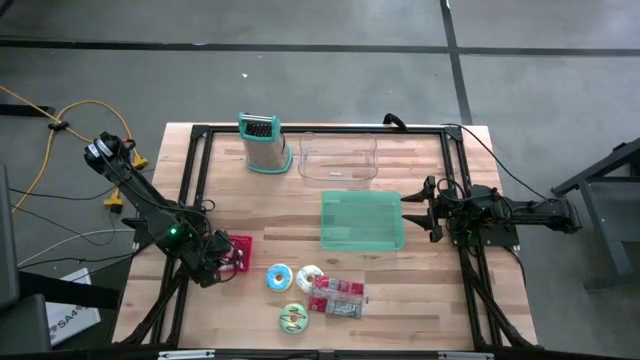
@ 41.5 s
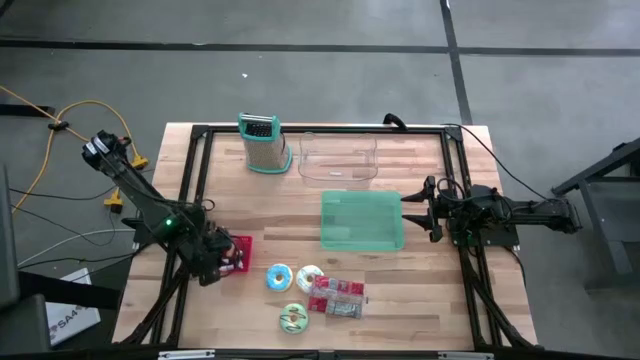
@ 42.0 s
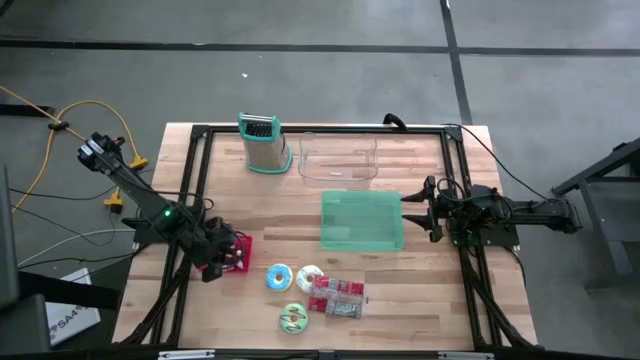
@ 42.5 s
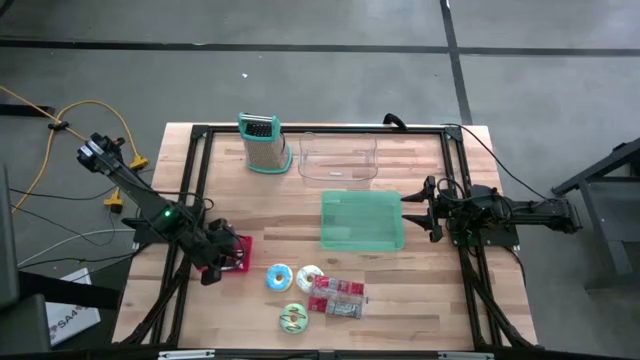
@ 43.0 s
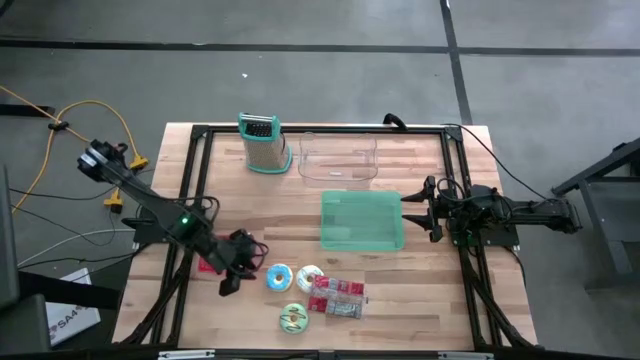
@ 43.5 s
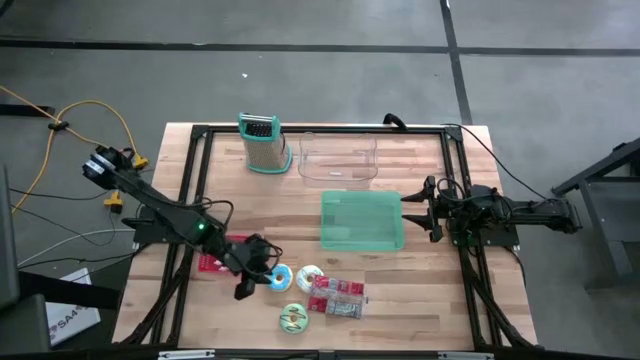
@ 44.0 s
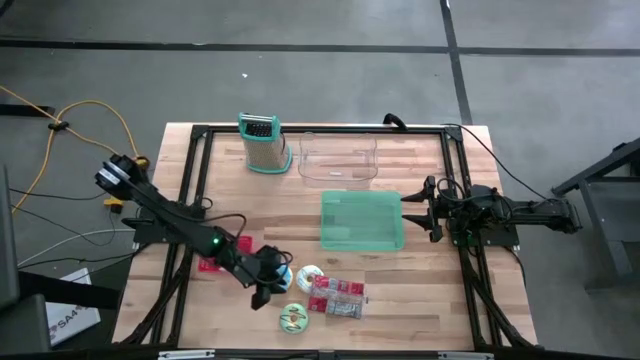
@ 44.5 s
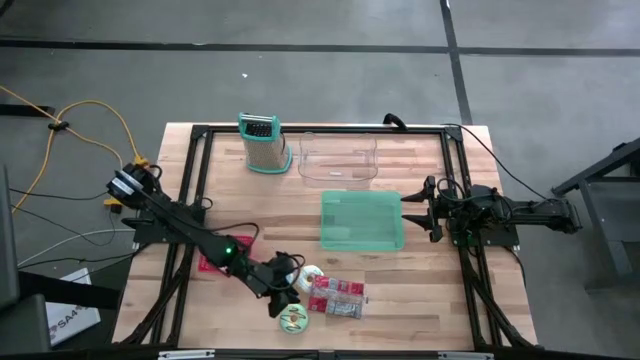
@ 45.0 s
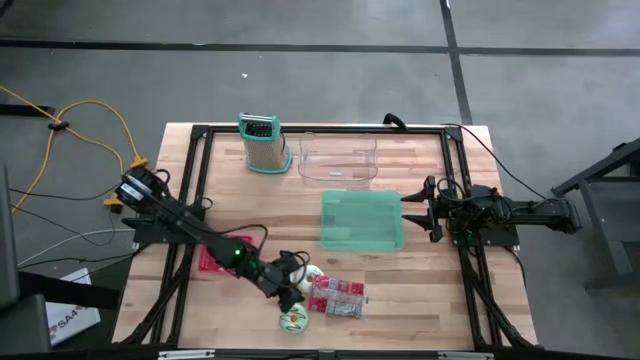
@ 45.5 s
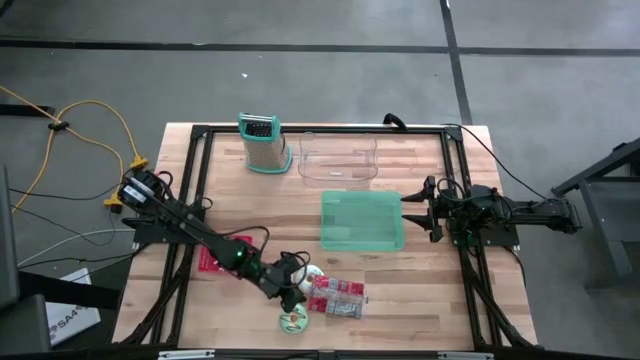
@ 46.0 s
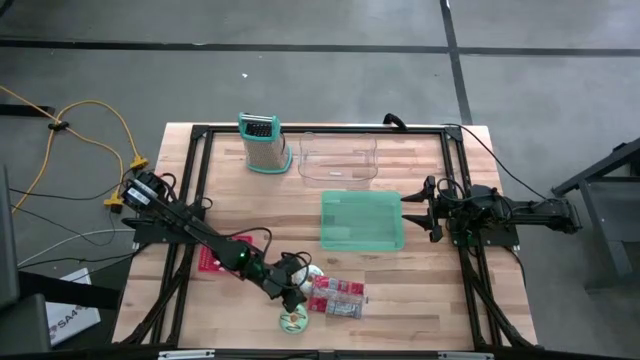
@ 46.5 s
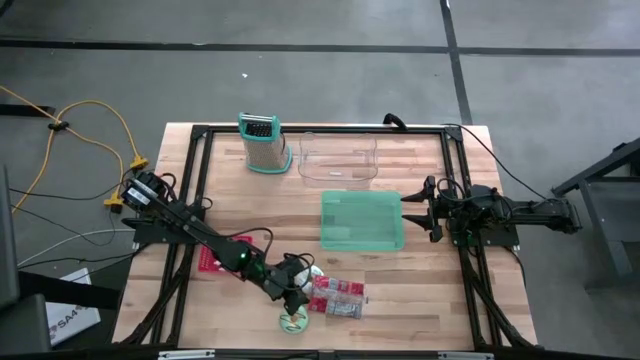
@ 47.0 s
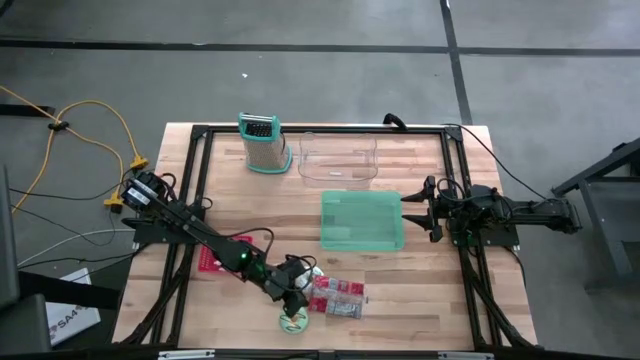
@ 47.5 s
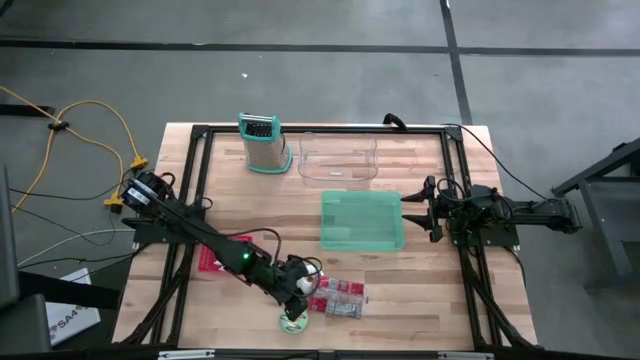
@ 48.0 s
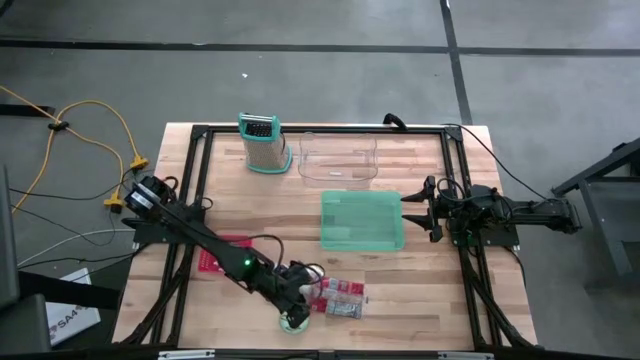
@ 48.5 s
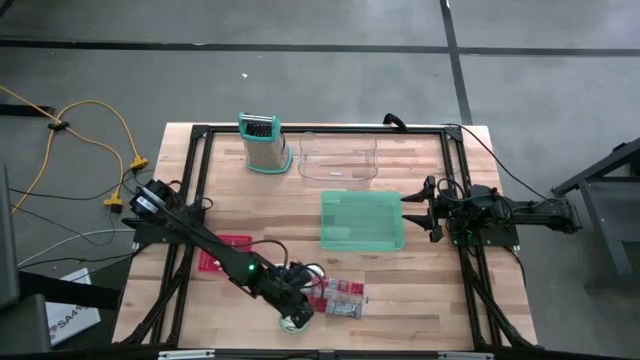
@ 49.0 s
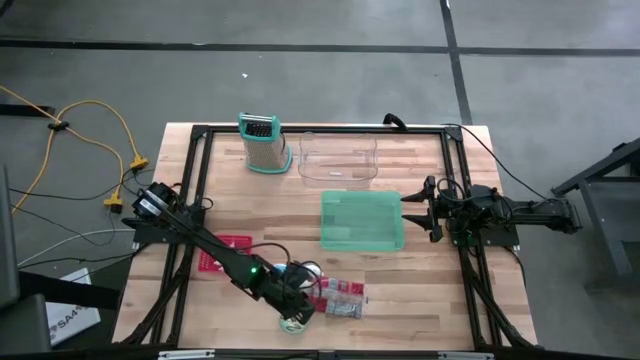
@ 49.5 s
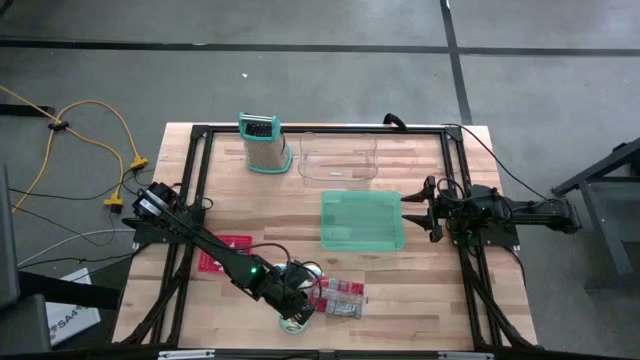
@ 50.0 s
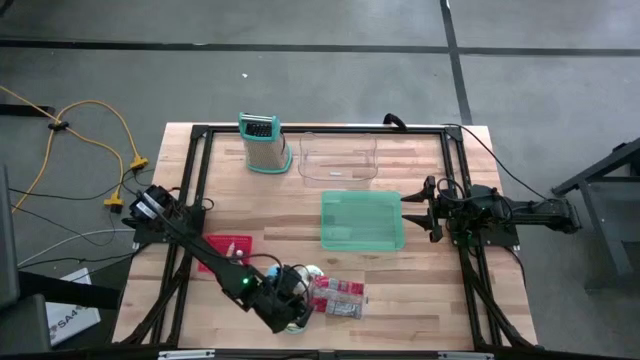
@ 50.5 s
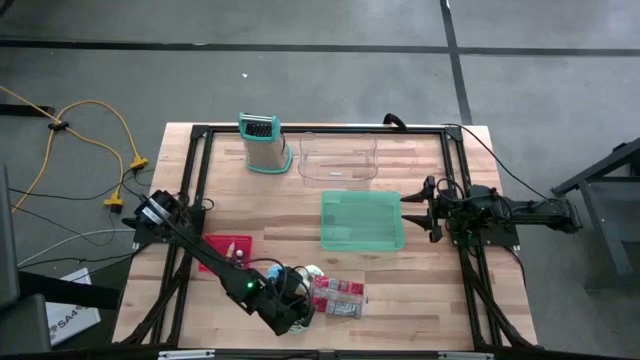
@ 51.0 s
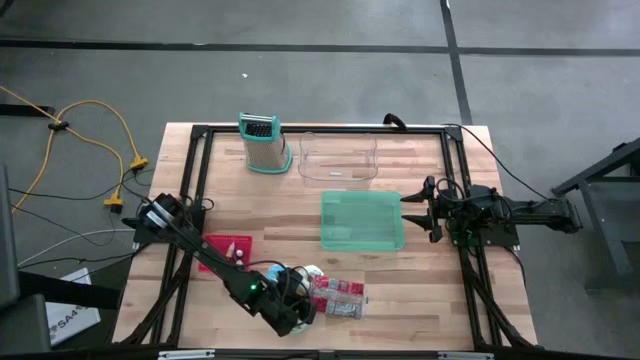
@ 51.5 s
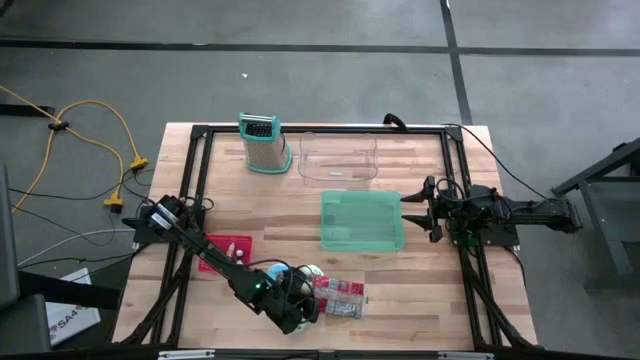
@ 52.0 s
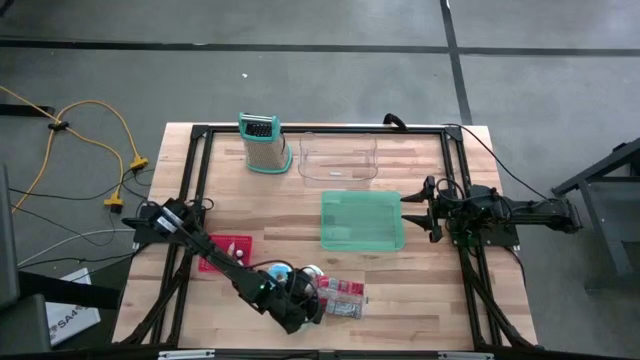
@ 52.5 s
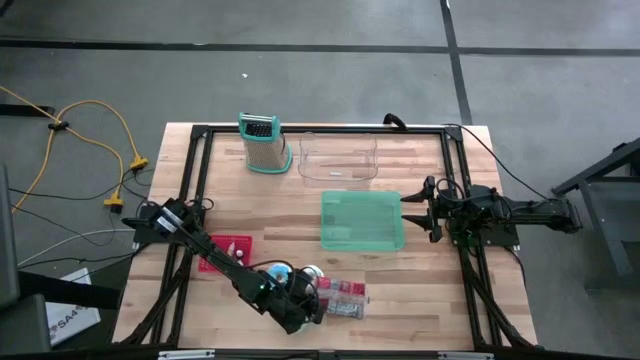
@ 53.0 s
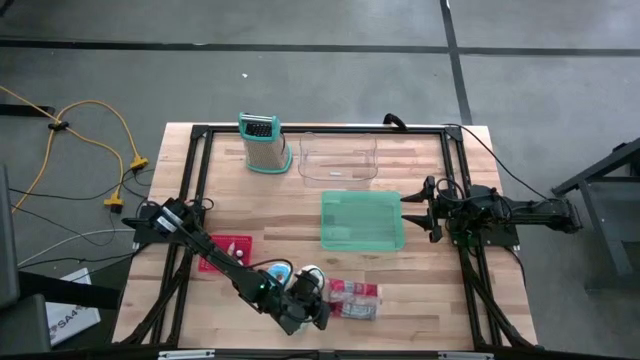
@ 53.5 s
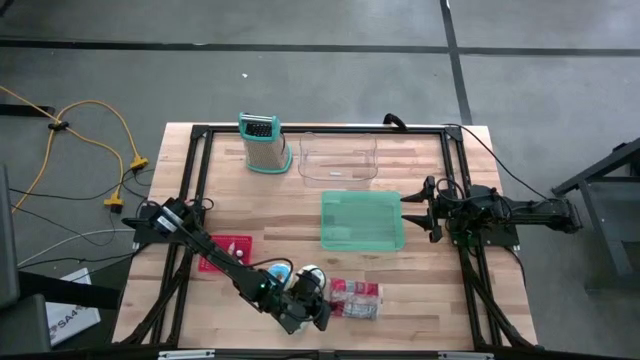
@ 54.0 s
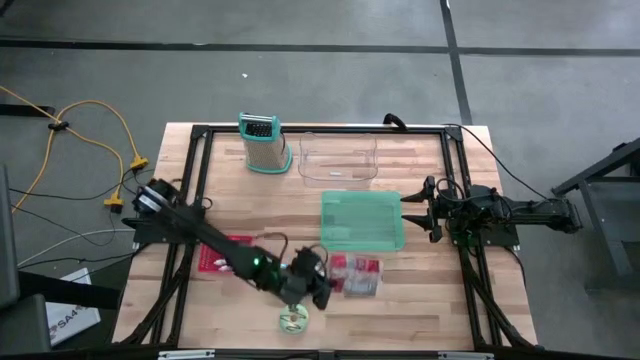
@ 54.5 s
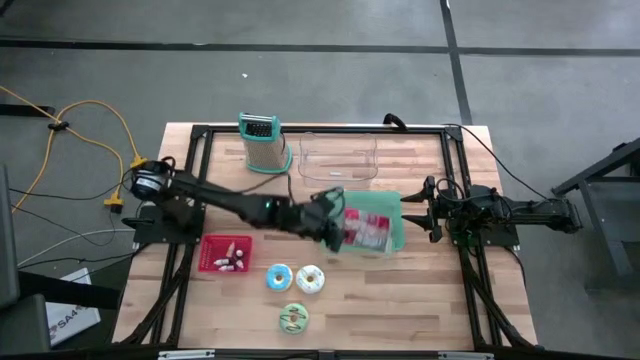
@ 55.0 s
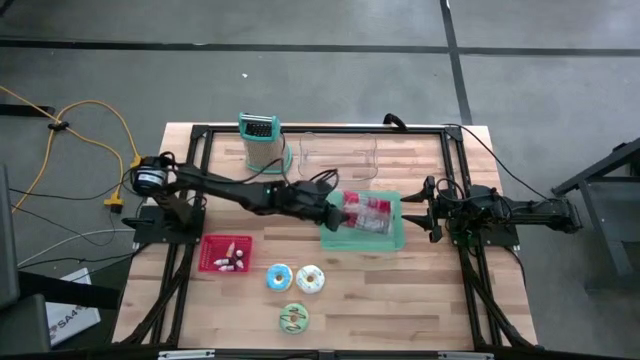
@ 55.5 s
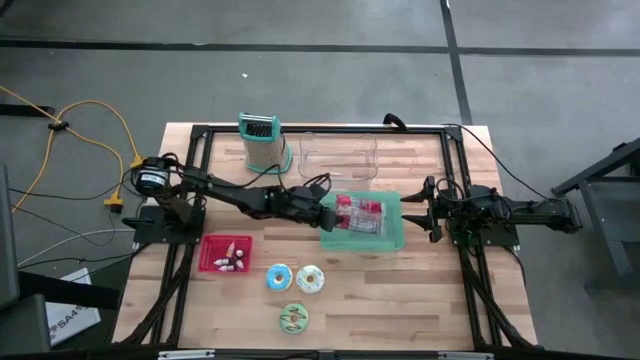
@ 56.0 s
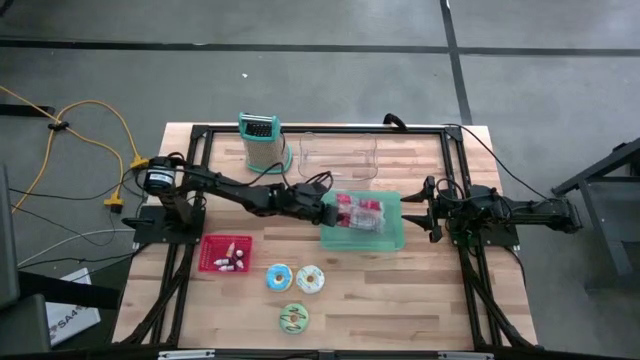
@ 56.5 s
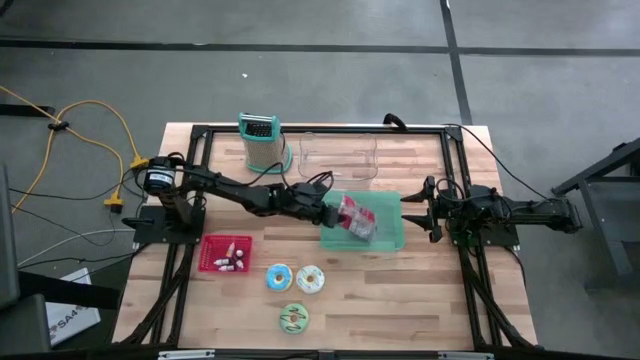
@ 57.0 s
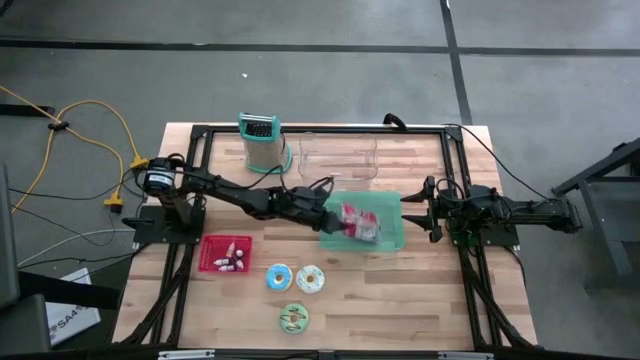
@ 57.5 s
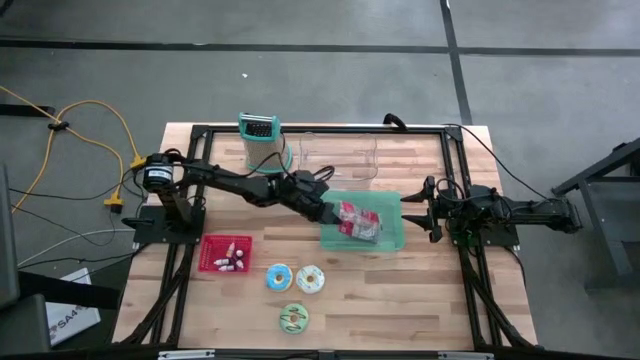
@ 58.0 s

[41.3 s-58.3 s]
Put the red popcorn bag into the green bin
